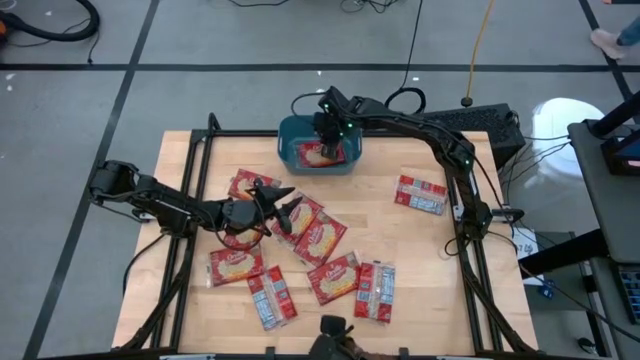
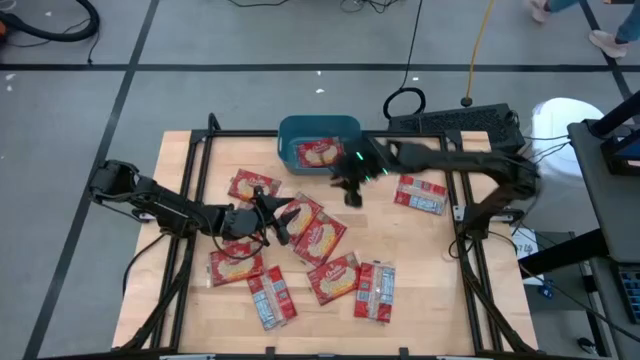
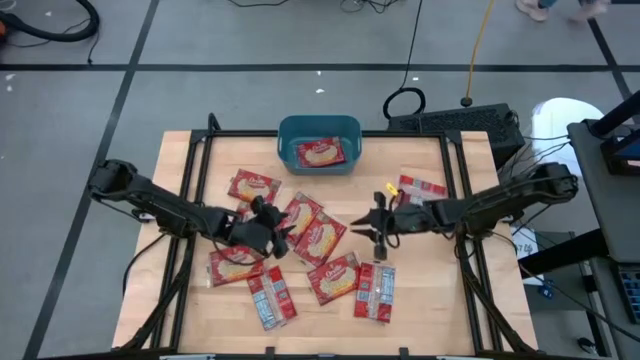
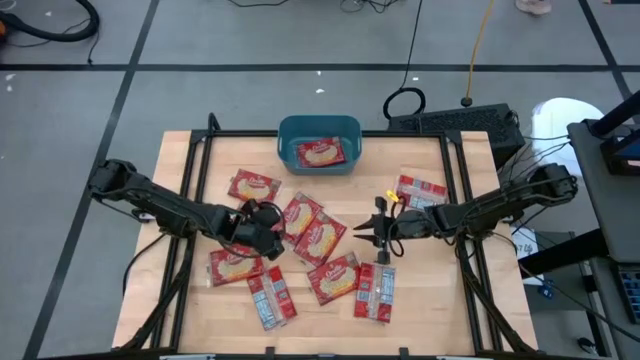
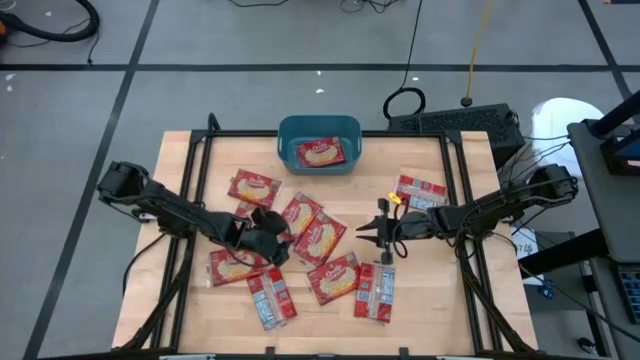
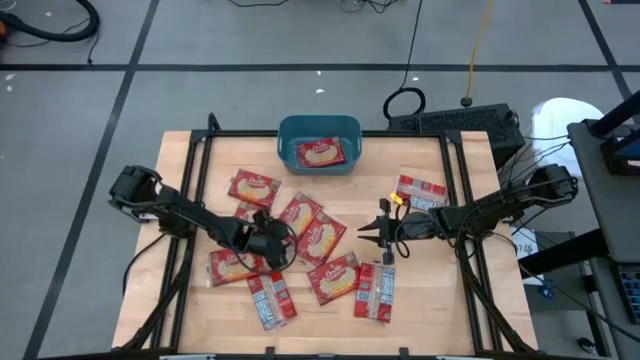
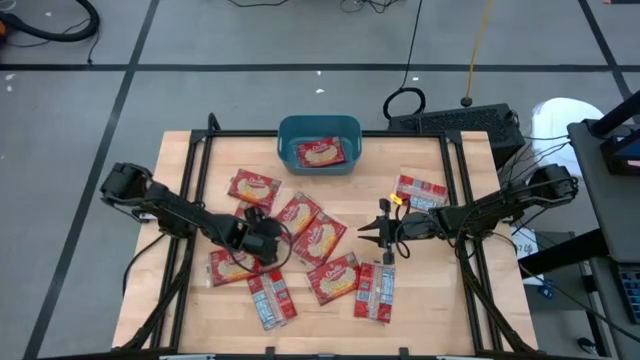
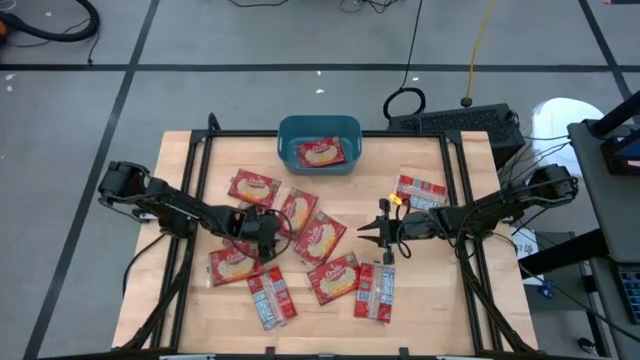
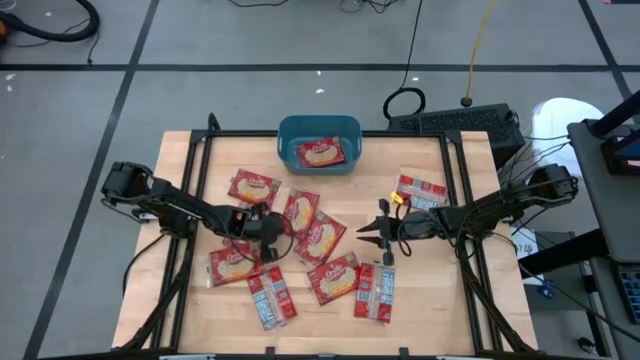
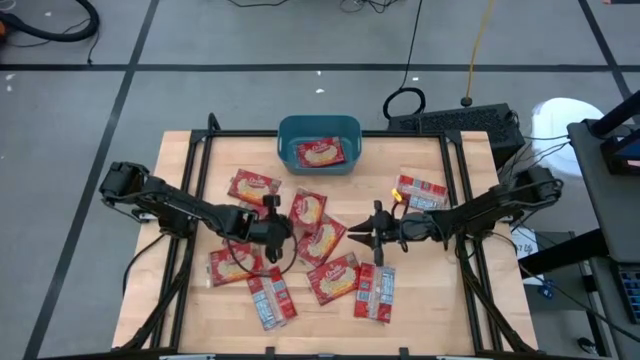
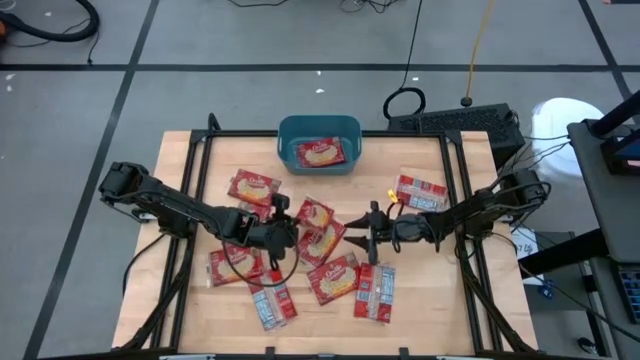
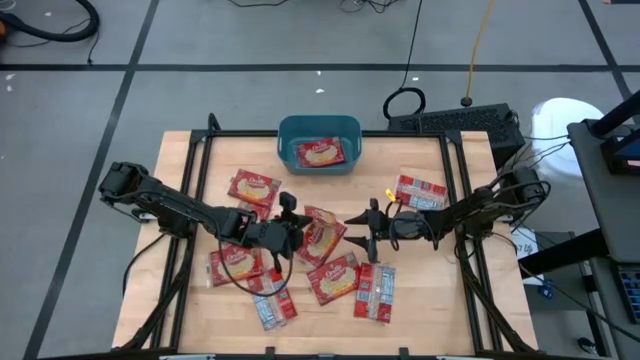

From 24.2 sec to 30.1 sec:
Task: Sort popcorn bags into baskets
Put the red popcorn bag into the blue bin

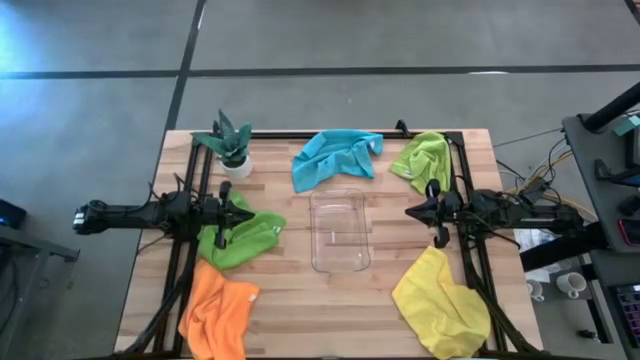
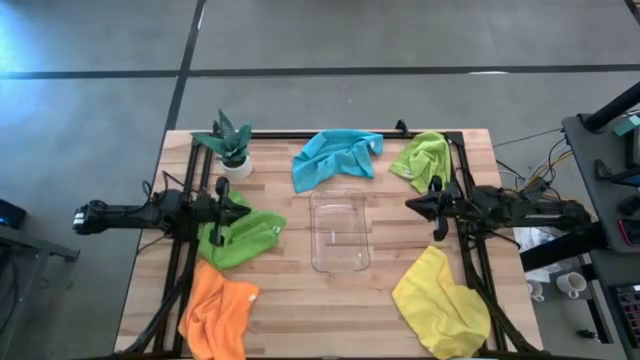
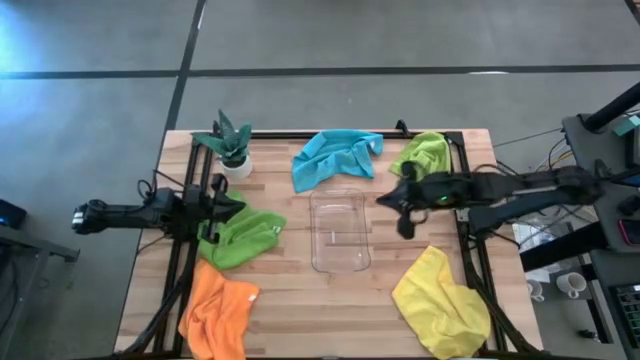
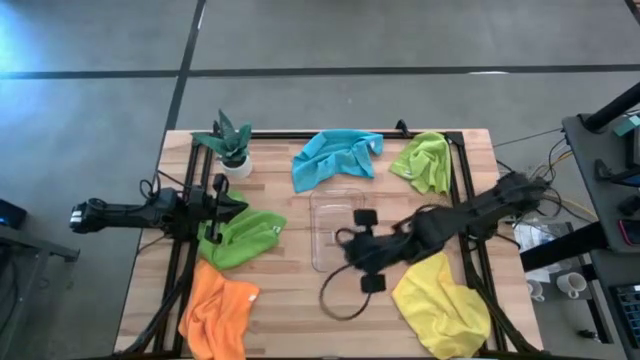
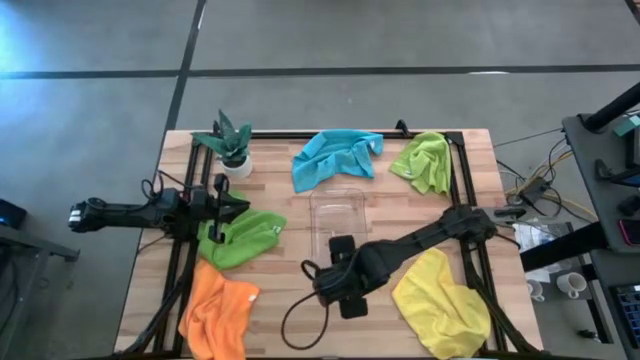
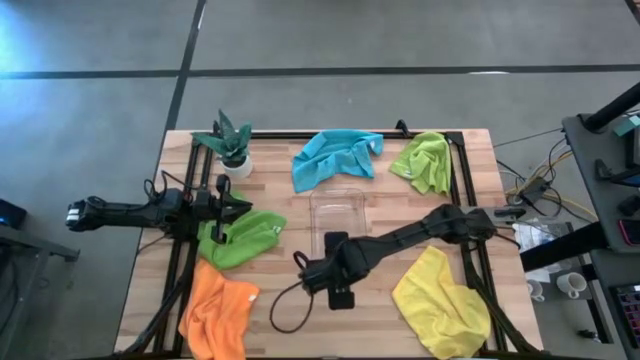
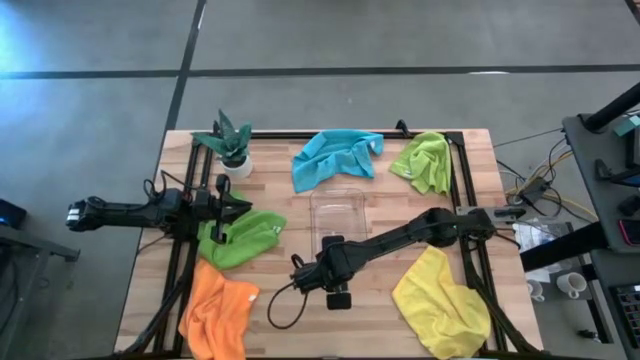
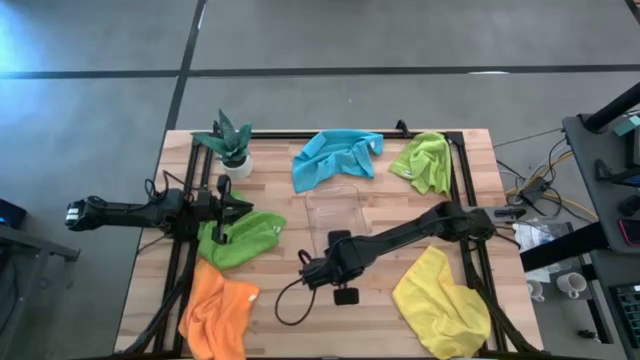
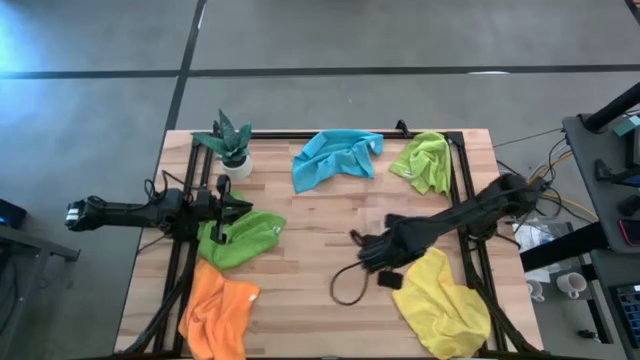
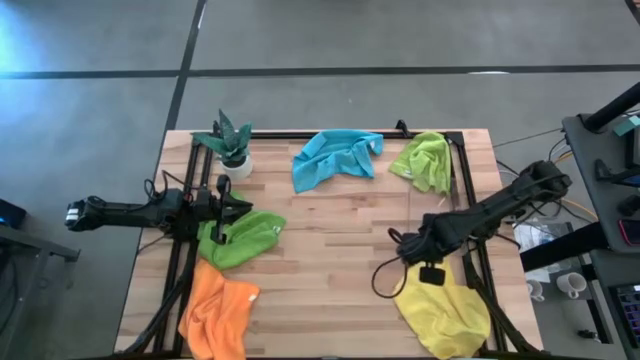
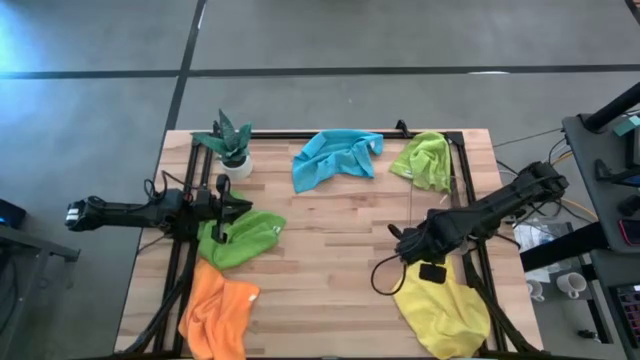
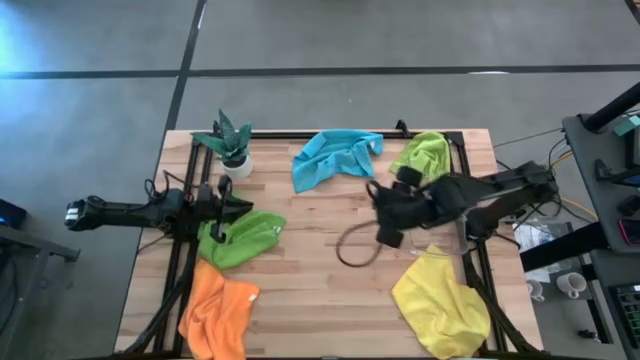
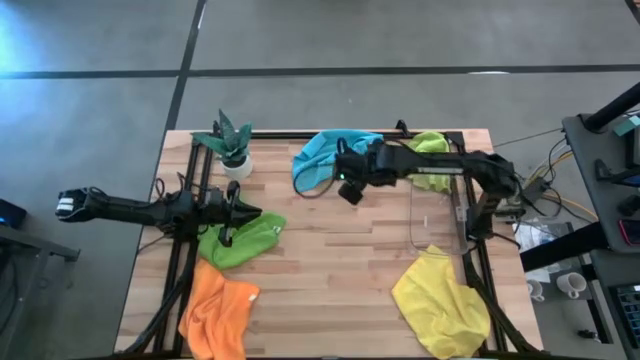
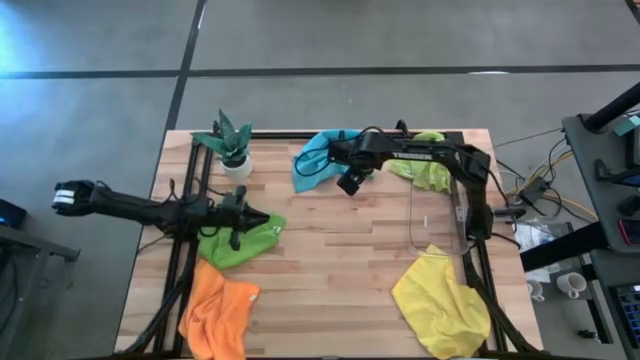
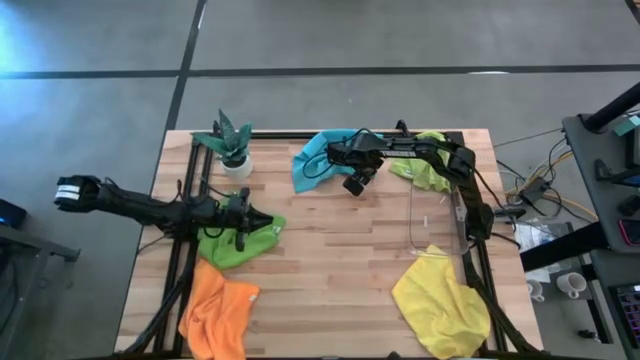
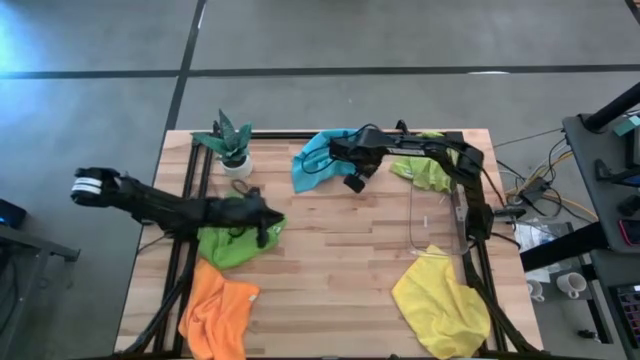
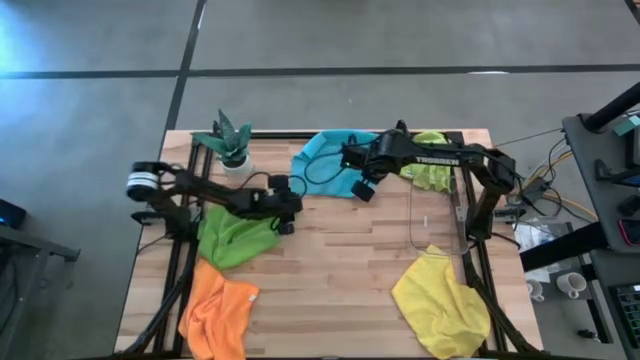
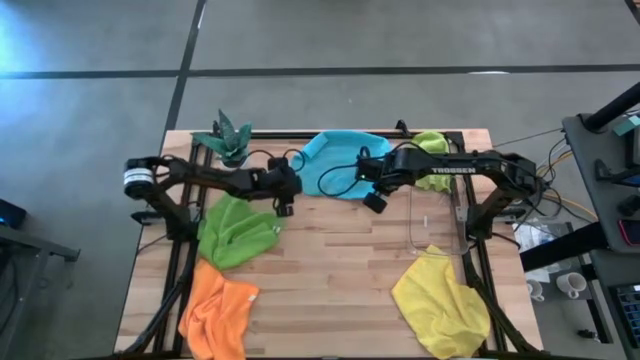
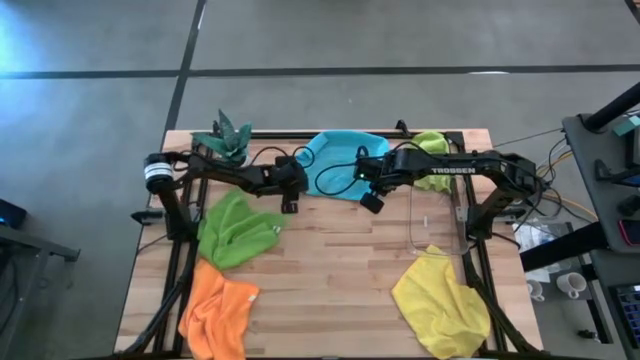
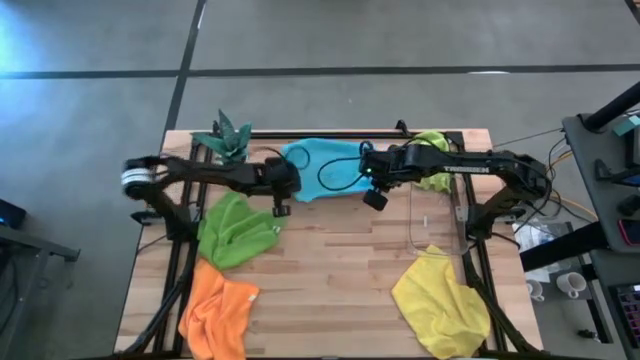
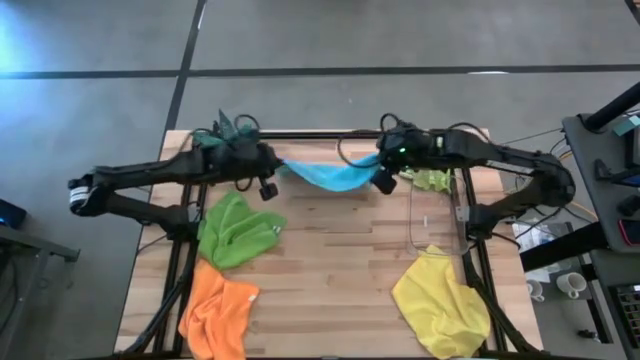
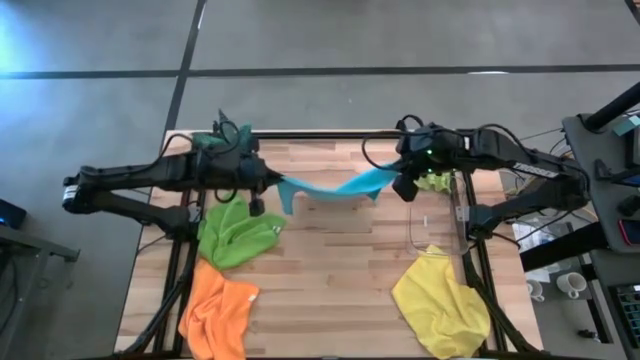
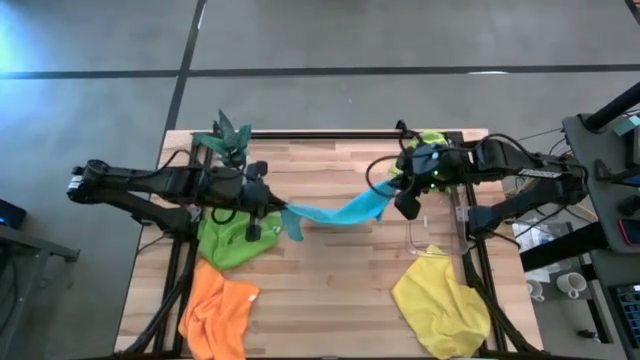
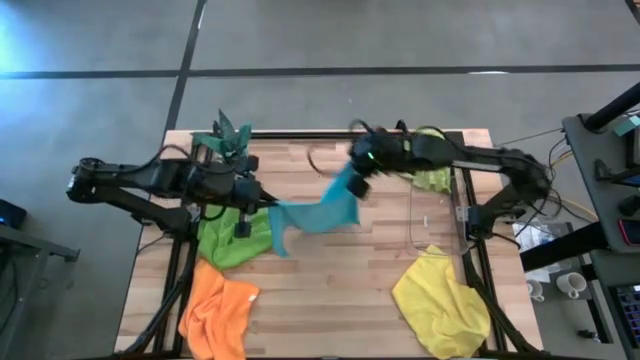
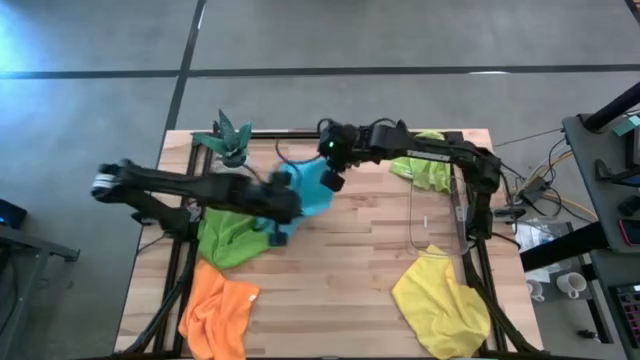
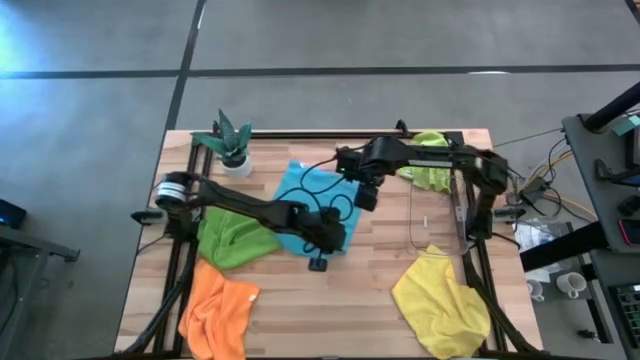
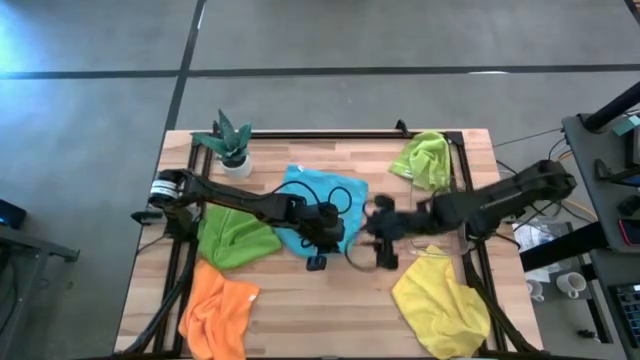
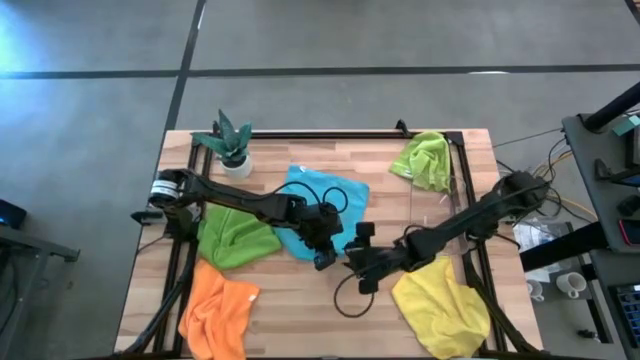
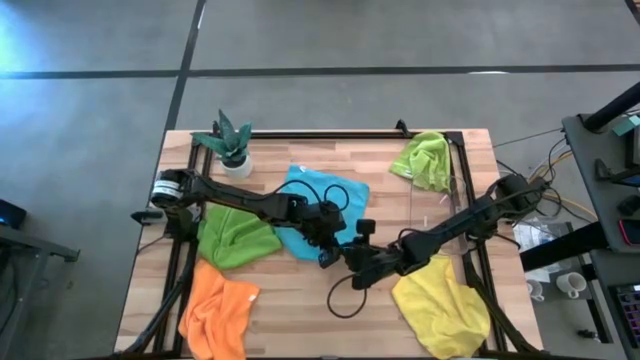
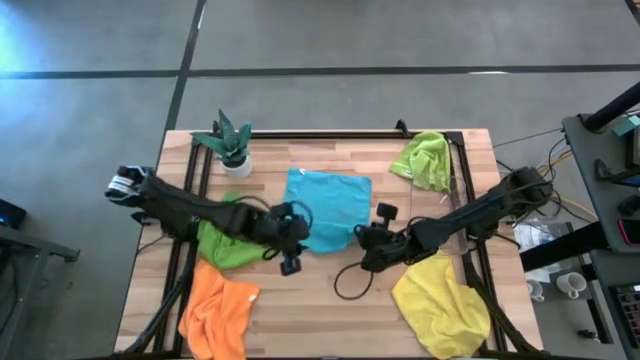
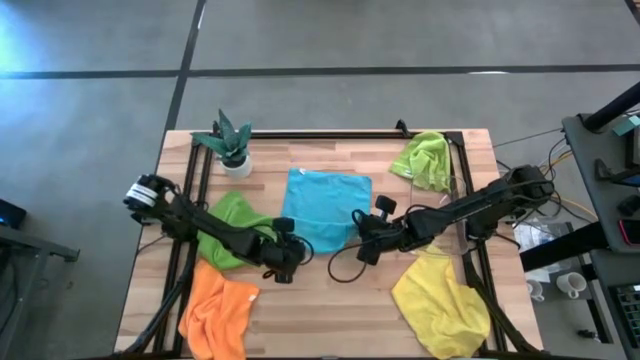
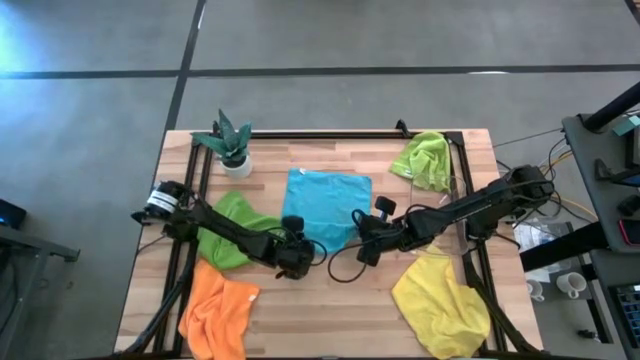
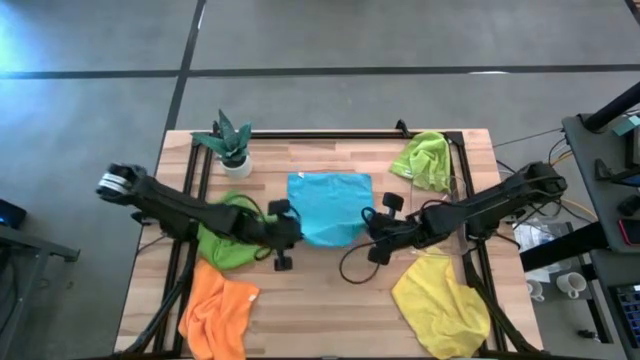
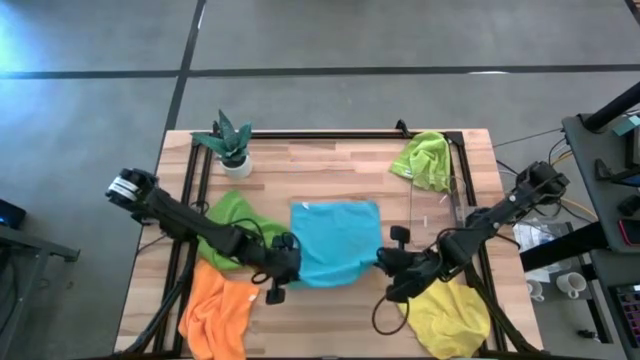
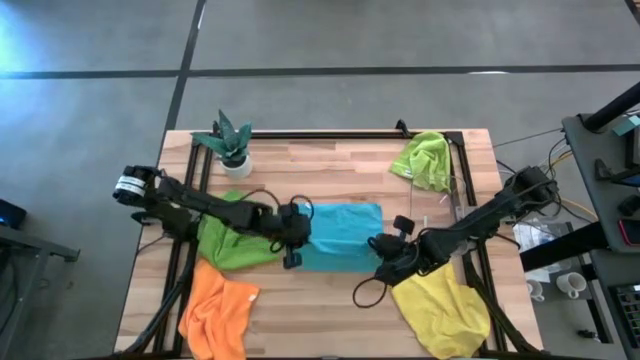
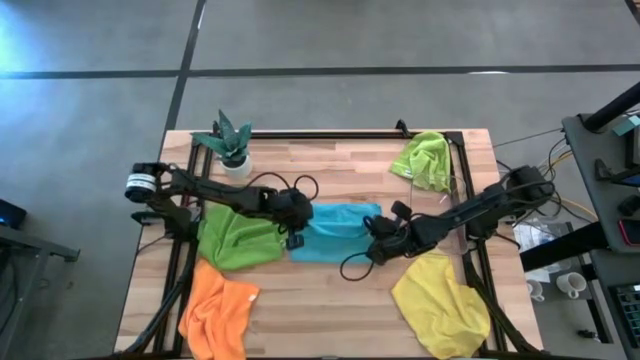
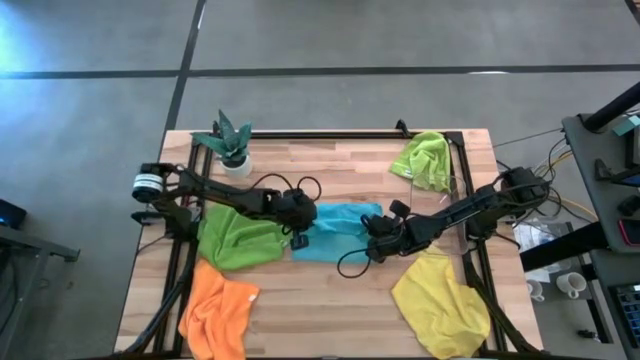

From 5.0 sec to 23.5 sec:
Task: Fold microfiber towels
Fold the blue microfiber cloth
